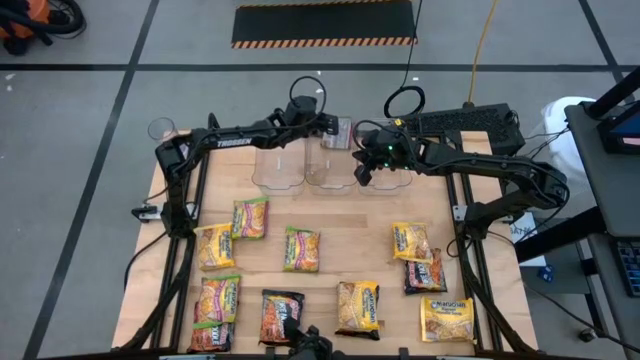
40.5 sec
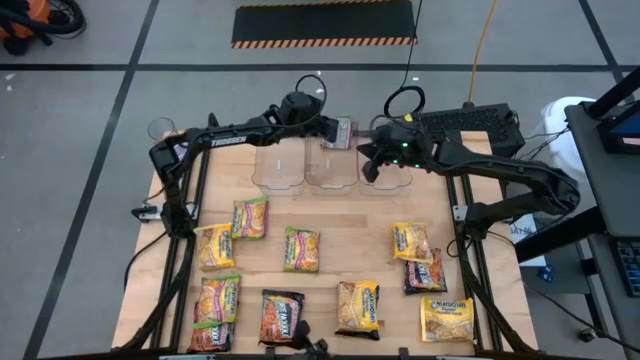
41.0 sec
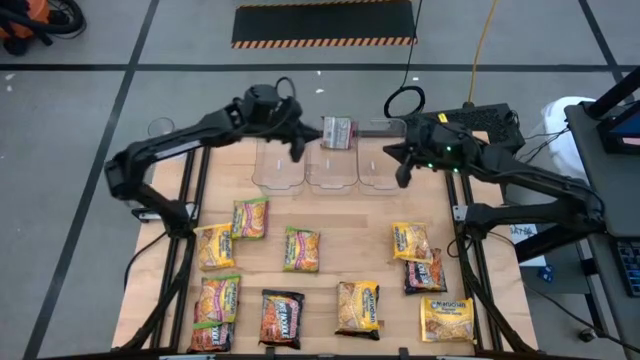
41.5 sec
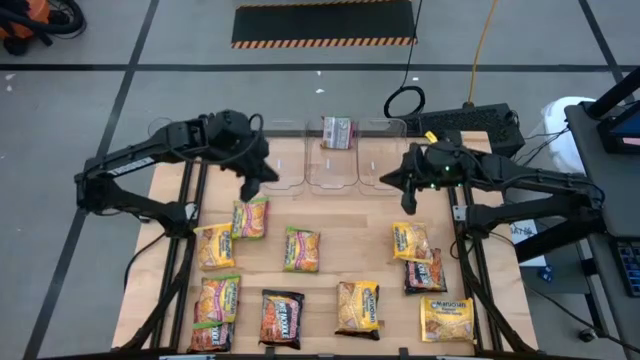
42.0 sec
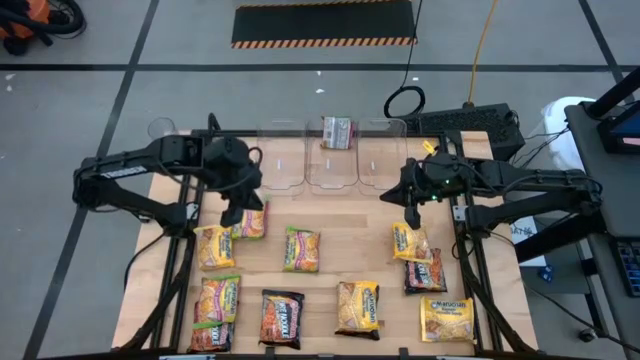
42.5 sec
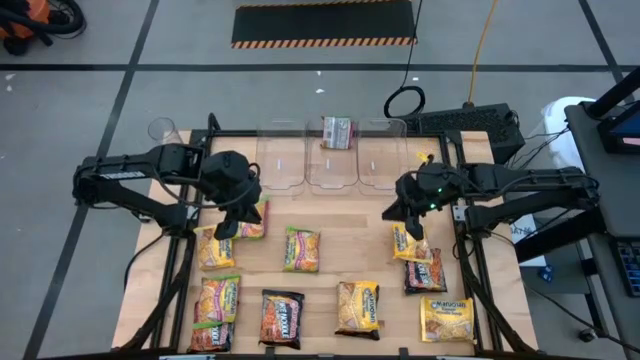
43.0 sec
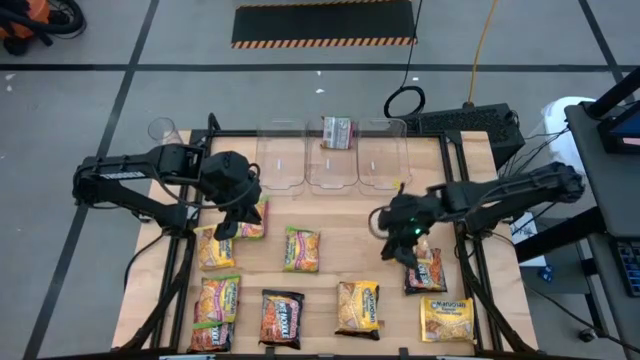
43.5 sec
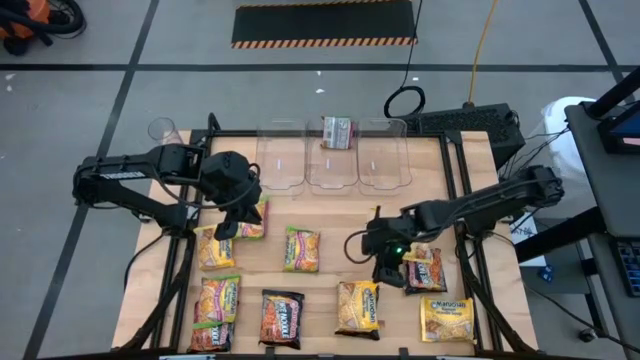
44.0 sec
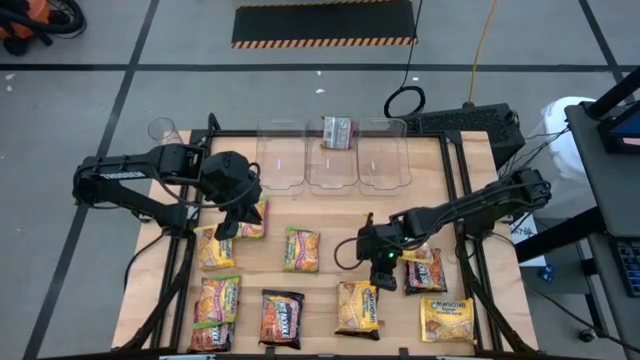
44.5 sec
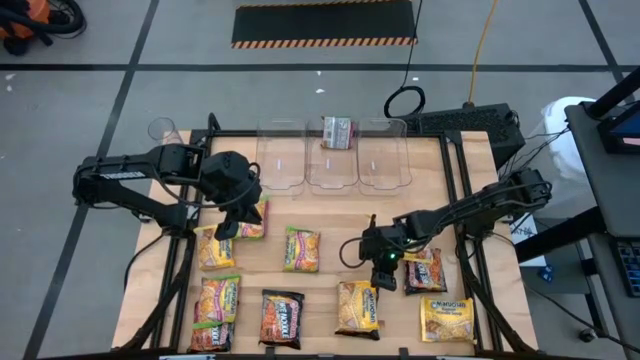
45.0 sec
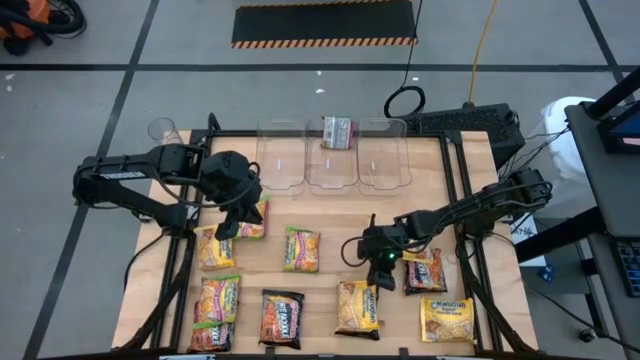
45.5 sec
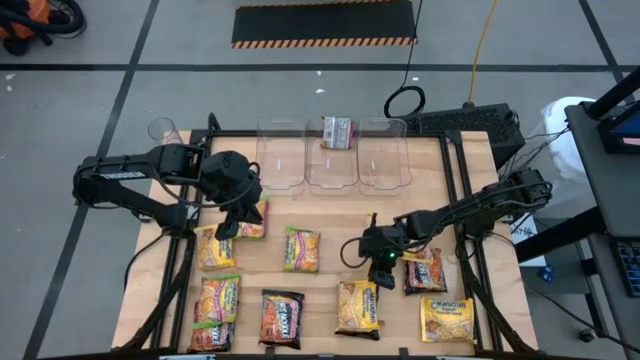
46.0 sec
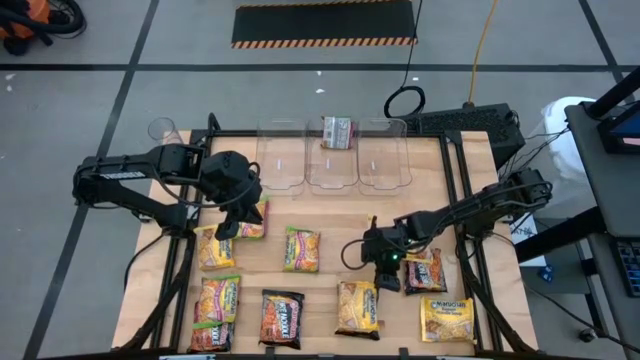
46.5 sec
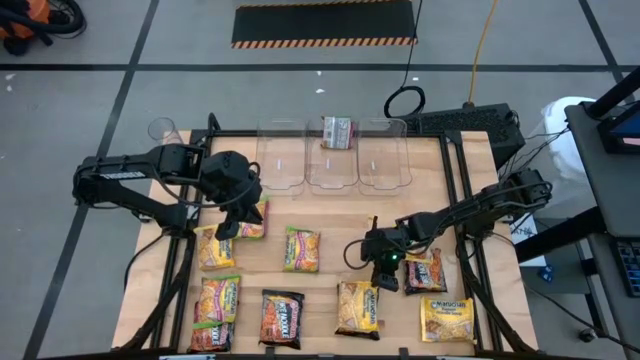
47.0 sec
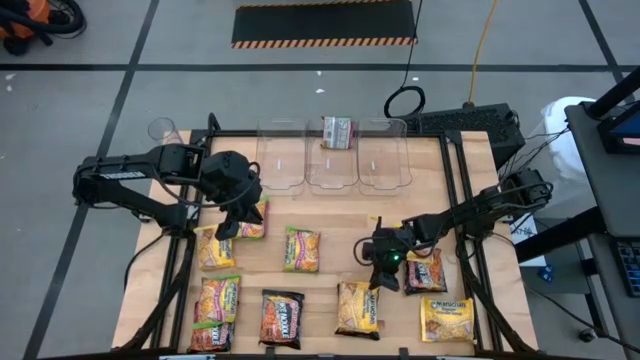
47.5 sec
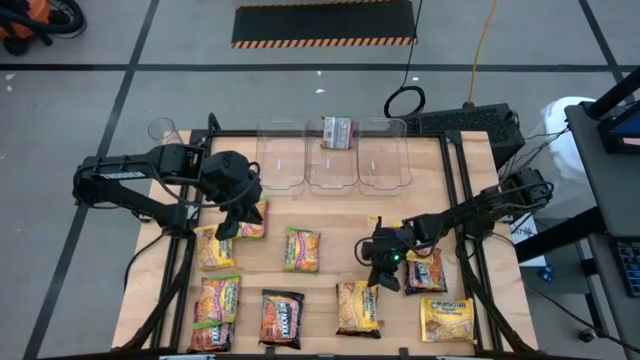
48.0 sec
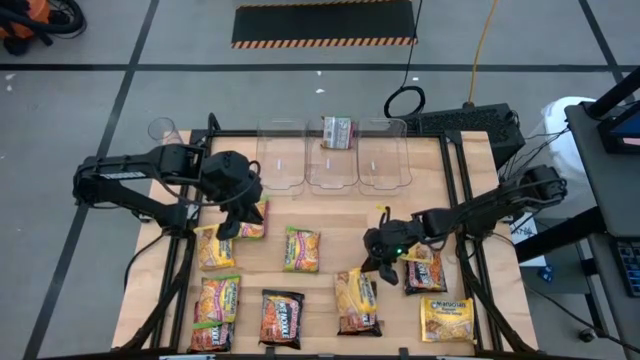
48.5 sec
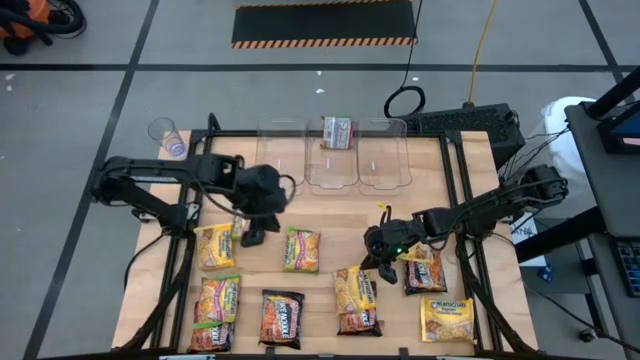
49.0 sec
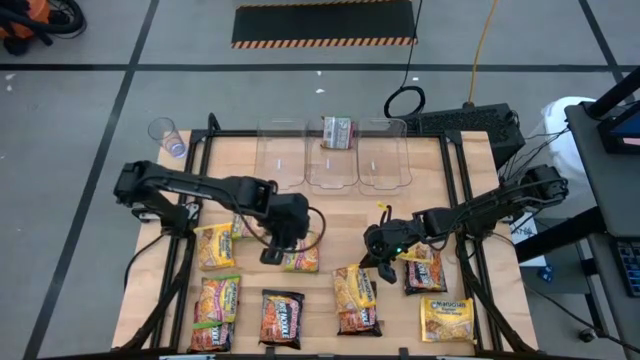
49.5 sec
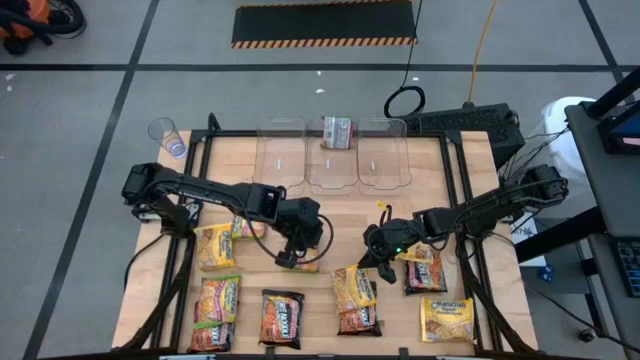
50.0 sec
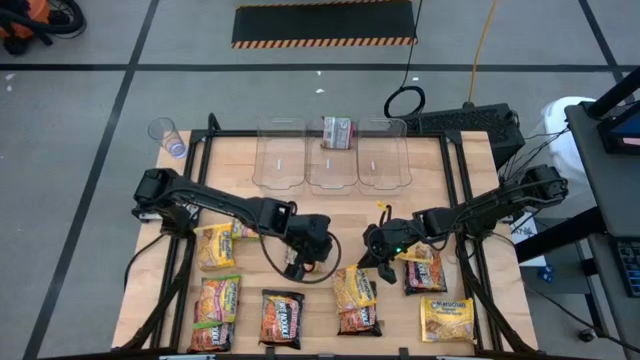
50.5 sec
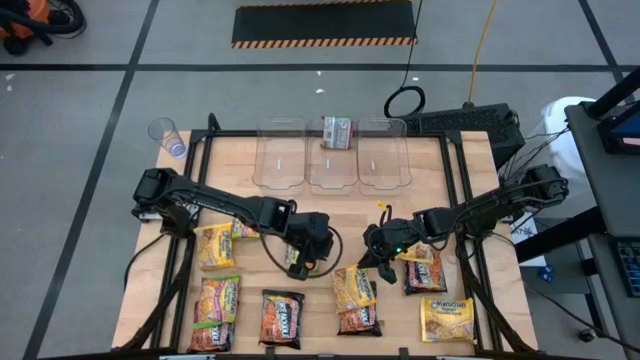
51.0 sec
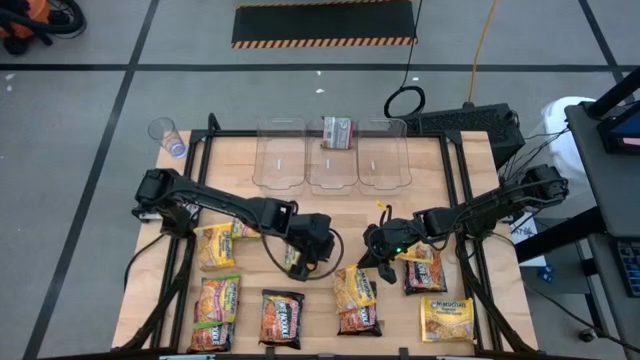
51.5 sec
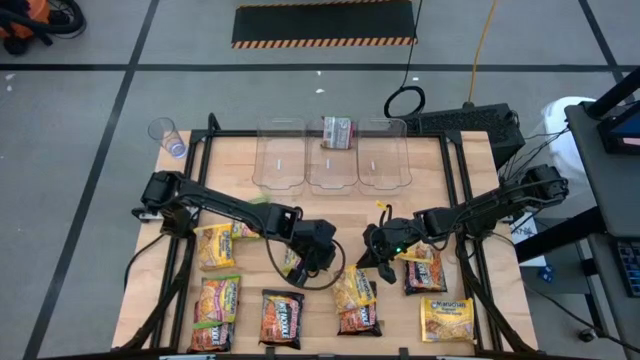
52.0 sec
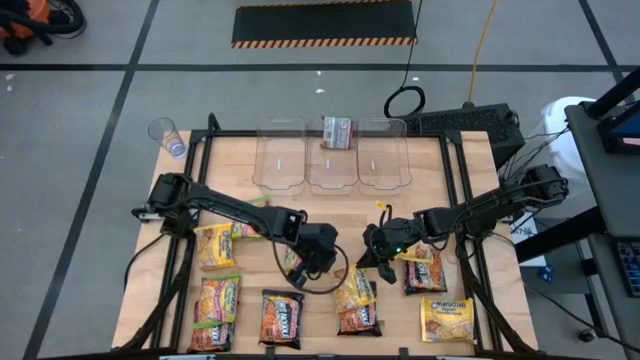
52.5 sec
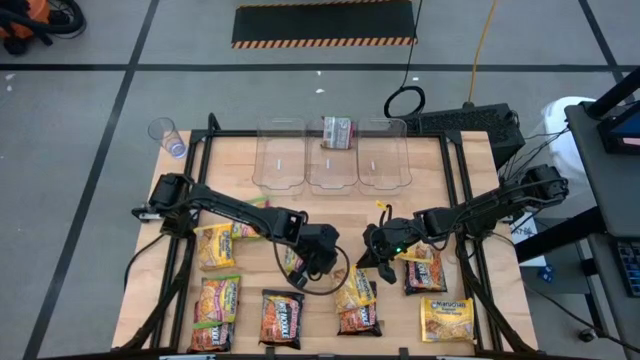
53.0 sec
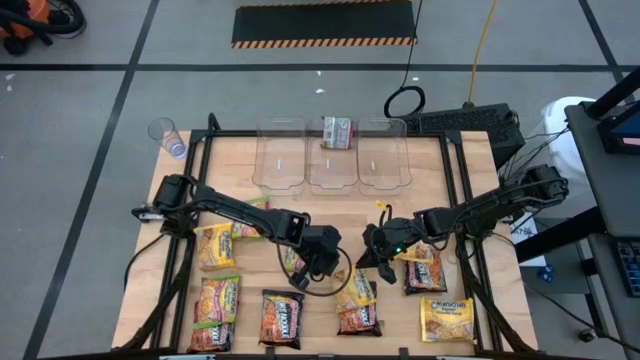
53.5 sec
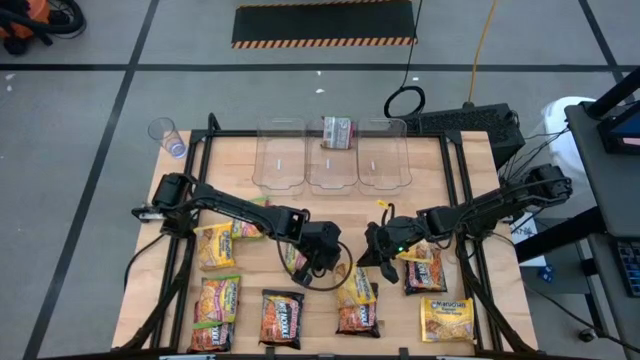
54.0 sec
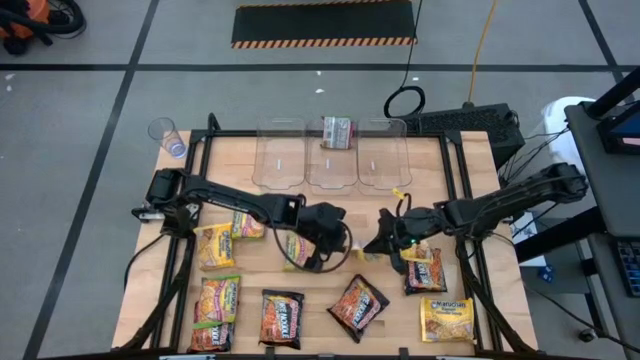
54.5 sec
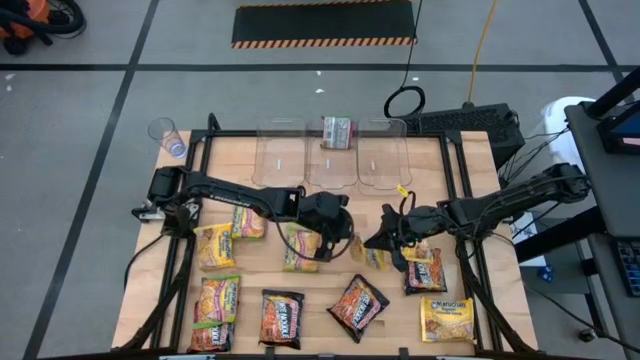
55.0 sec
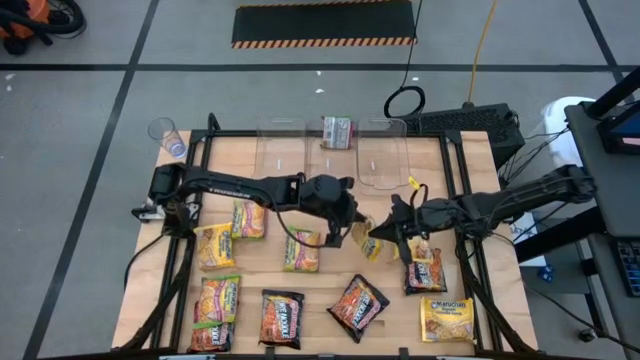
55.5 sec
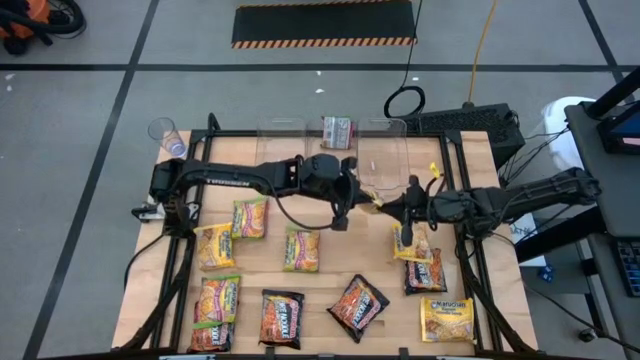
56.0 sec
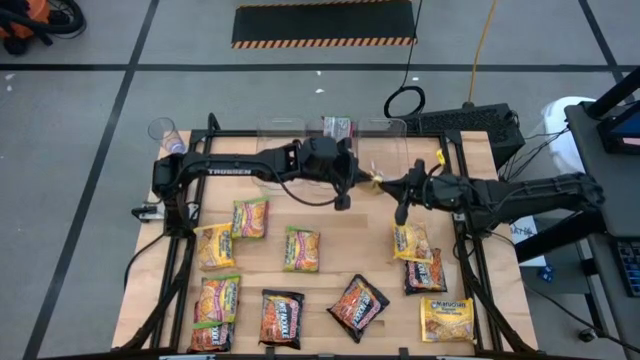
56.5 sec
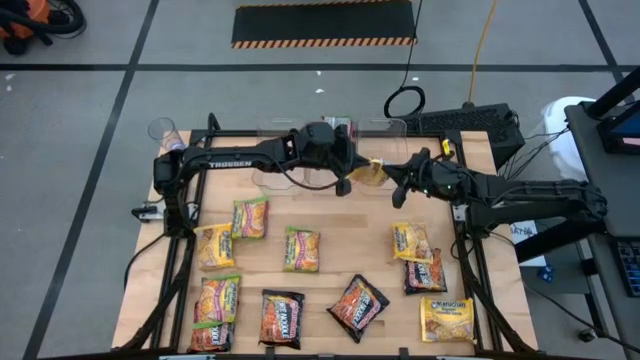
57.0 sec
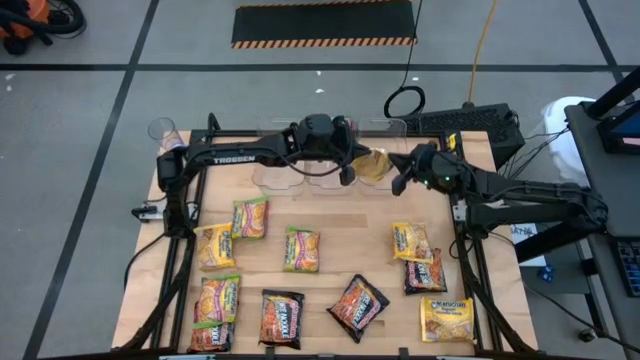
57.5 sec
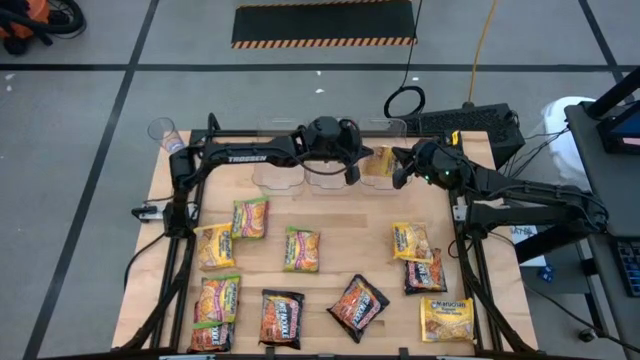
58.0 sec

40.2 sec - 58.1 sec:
Task: Sort Maruchan noodles
Put the yellow noodle pack into the right transparent bin

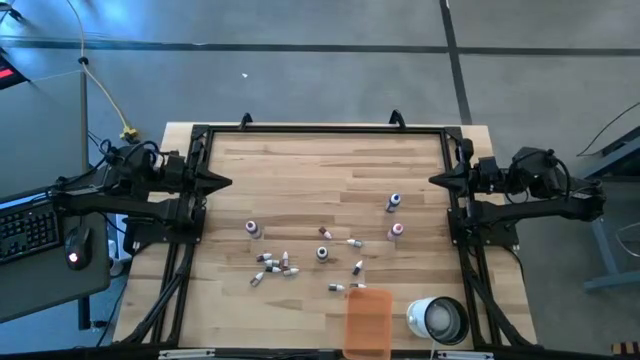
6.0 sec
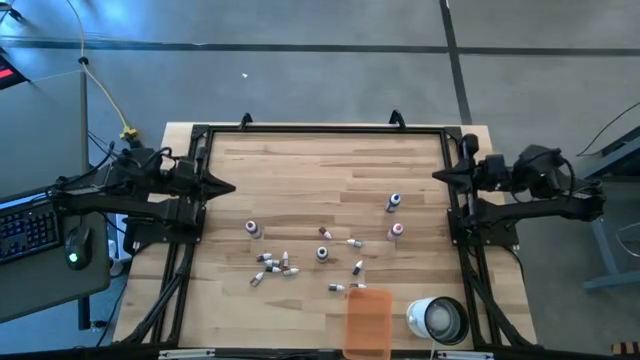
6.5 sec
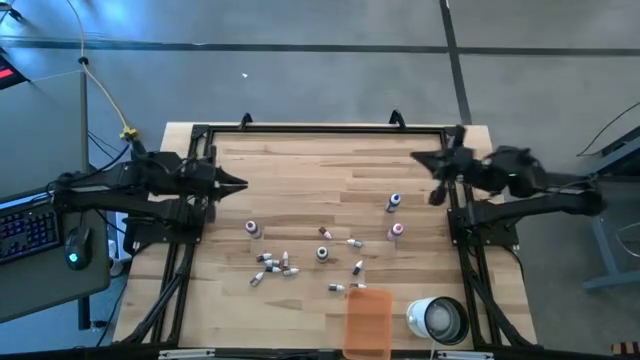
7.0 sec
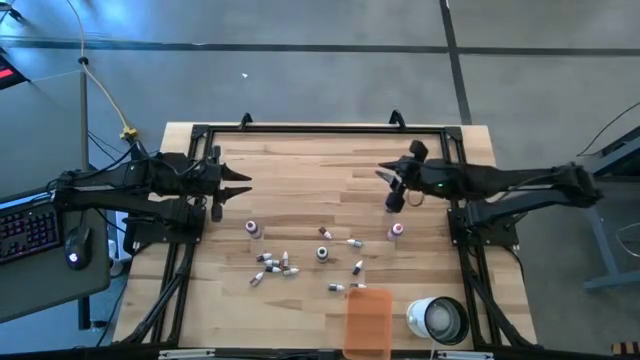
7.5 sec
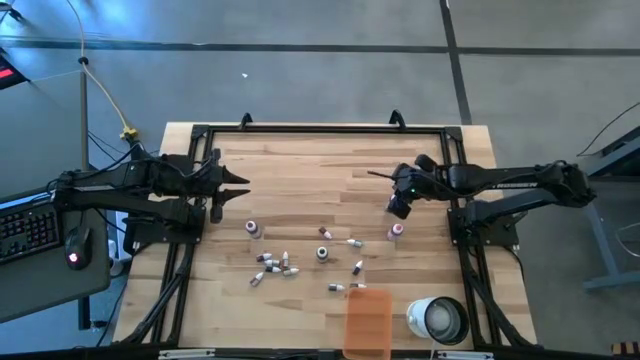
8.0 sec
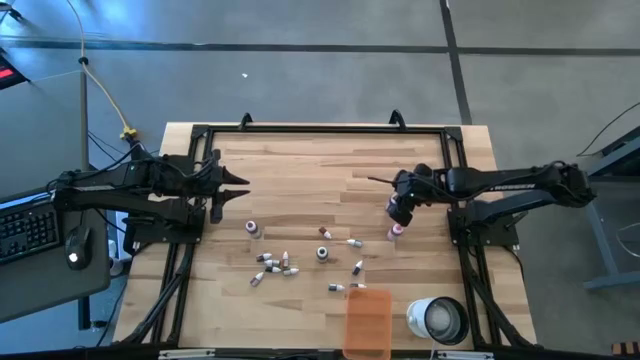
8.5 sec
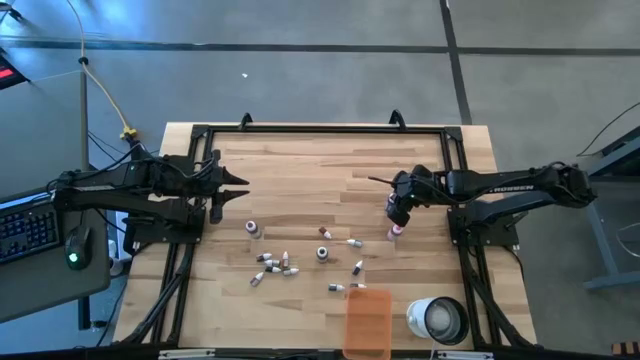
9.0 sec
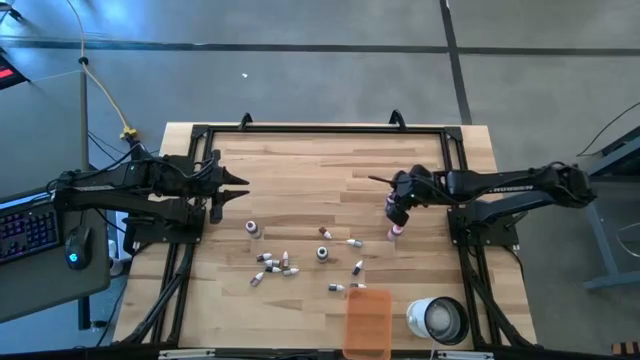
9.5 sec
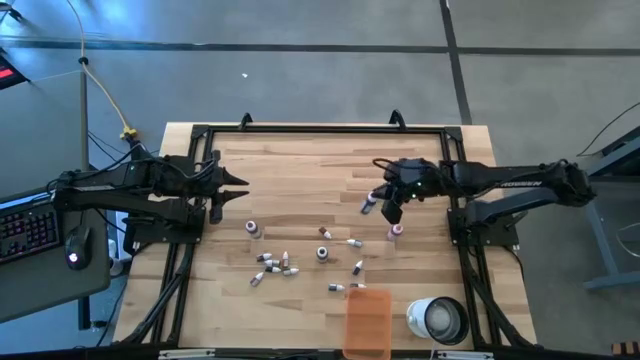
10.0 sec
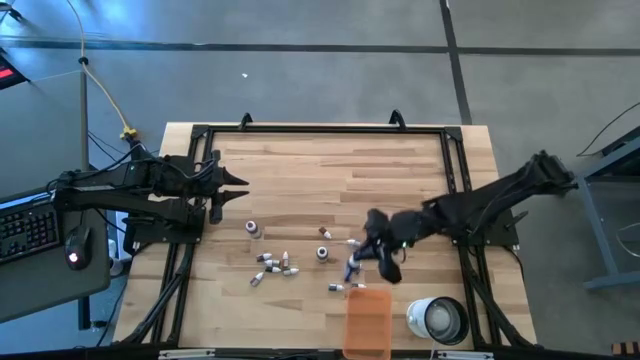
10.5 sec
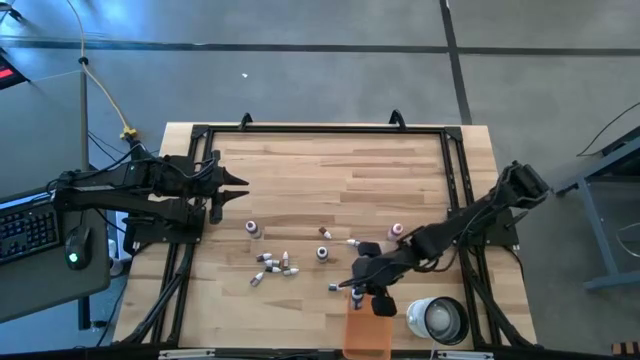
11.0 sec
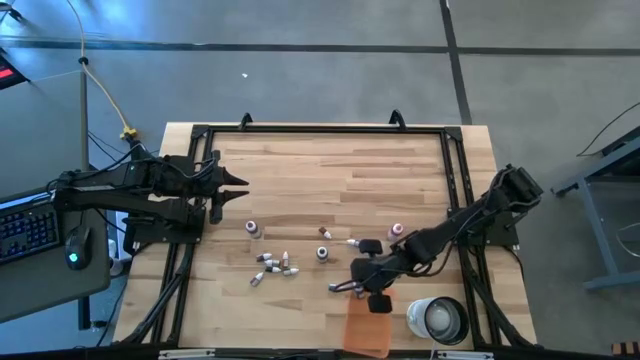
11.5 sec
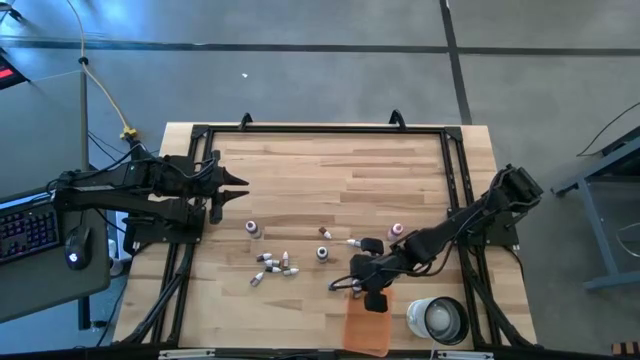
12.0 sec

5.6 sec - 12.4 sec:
Task: Pick & Place food coloring
Put the large blue food coloring bottle into the orange bin
